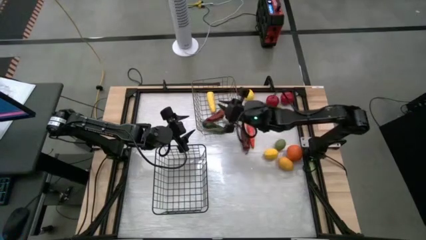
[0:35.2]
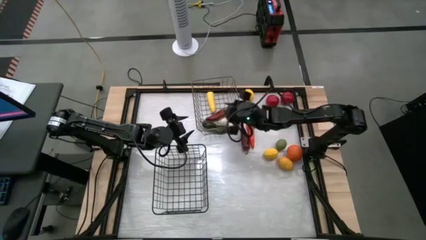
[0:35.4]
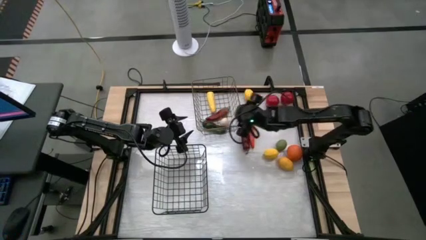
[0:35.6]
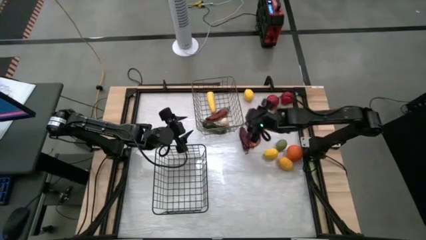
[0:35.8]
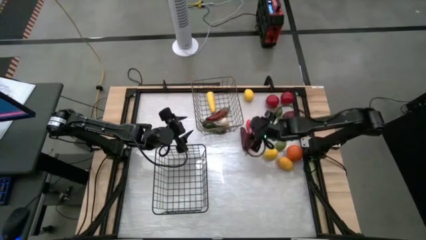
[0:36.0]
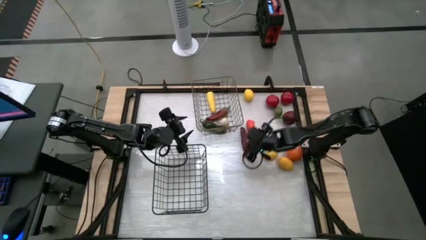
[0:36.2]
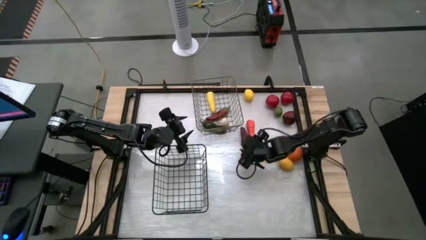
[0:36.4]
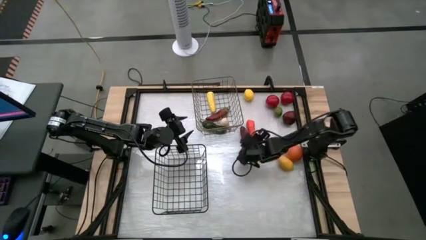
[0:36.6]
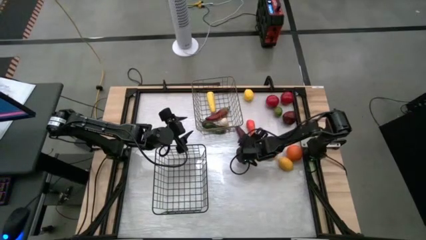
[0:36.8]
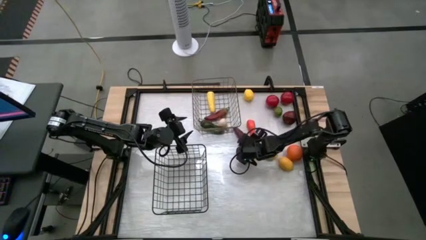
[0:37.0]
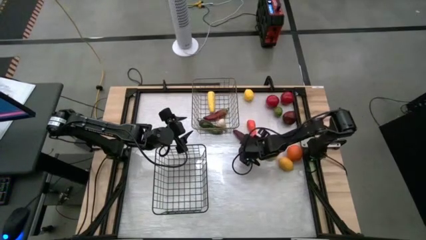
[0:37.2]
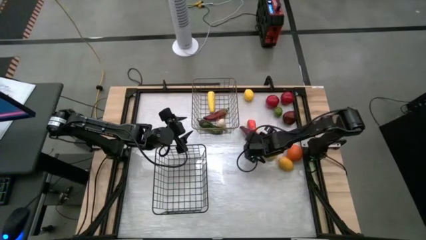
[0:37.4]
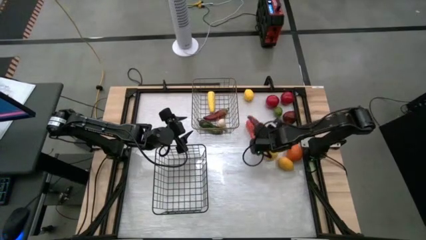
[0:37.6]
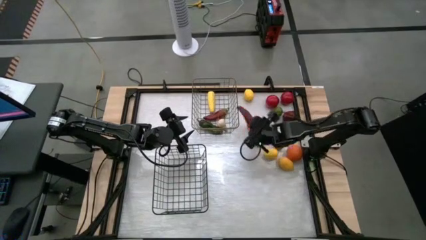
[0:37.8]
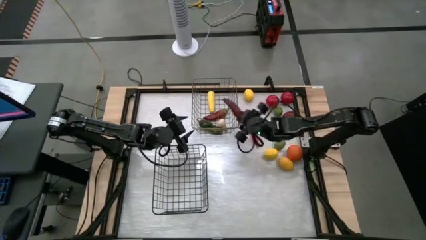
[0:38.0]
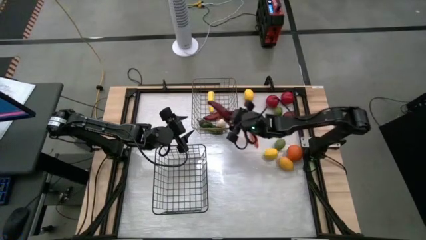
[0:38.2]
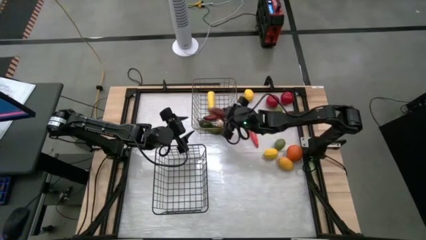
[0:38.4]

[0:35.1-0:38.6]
Task: Sort produce into baskets
Put the red chili pepper into the gold wire basket

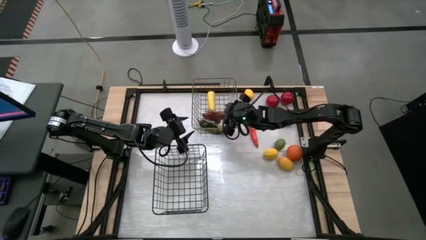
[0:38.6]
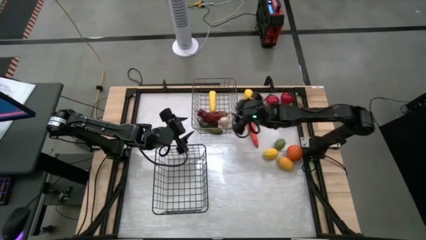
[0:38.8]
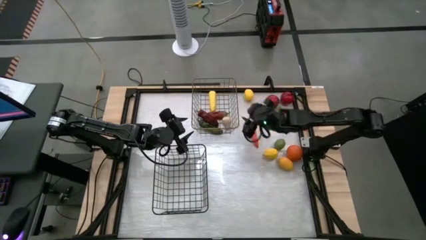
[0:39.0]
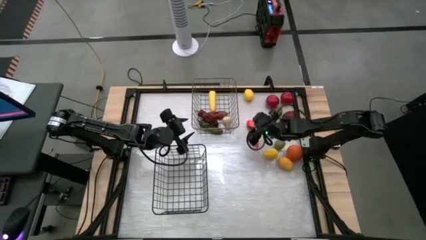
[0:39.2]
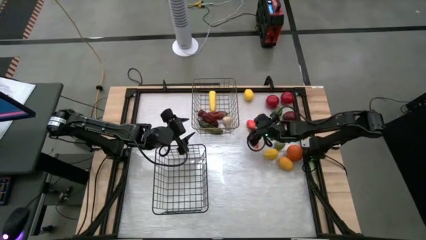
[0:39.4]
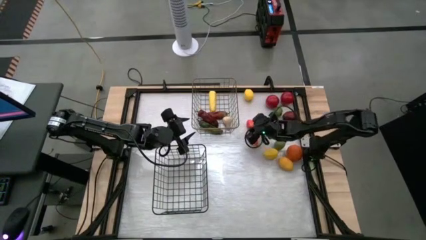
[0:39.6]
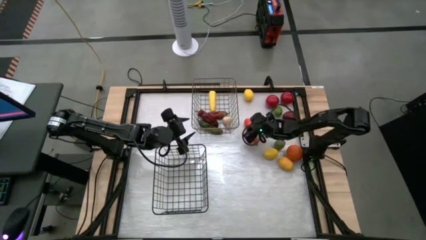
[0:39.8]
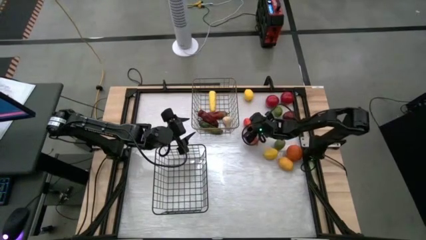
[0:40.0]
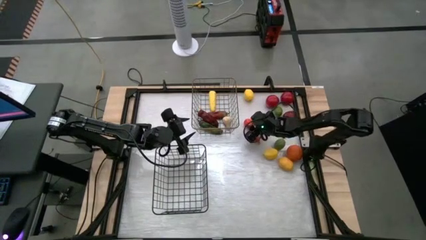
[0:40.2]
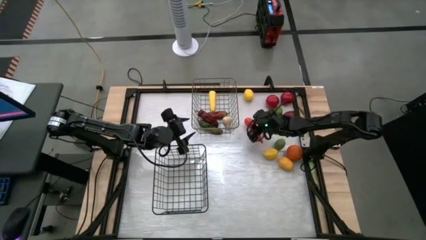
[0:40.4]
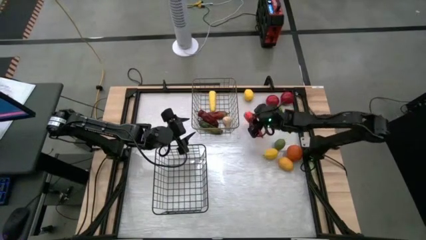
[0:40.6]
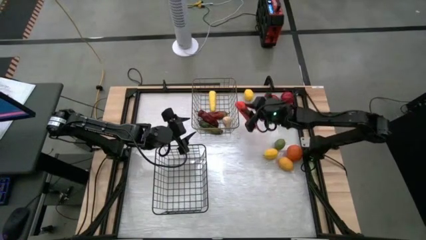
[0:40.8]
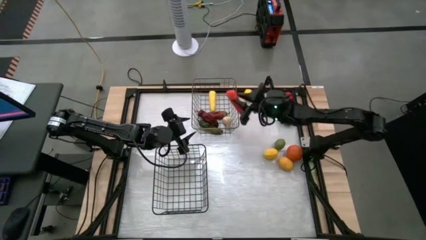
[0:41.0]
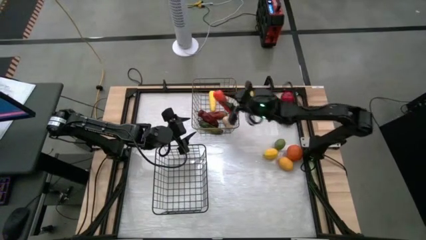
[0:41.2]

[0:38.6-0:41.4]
Put the carrot into the gold wire basket

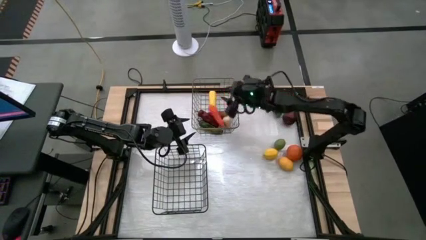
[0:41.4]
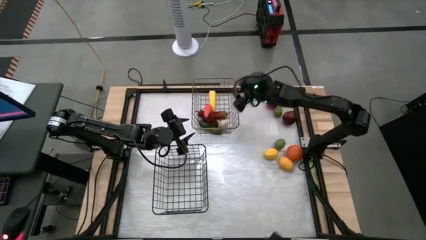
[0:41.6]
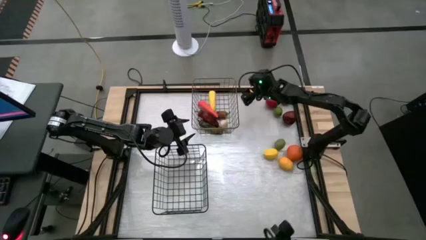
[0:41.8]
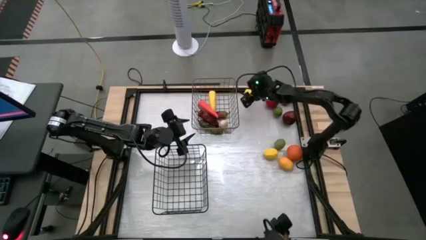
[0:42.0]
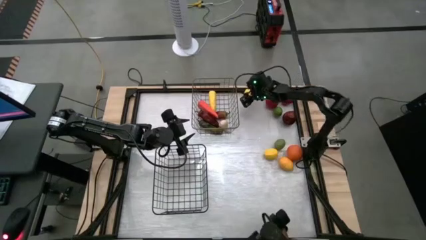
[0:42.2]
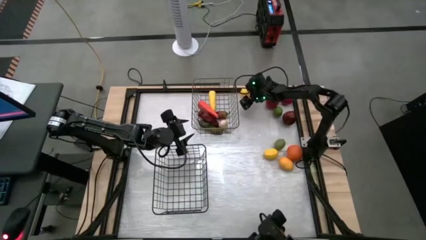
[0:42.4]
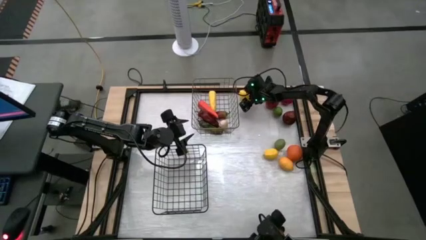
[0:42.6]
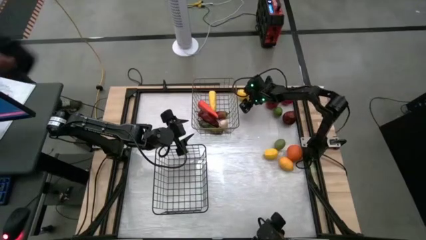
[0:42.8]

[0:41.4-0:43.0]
Put the top lemon into the black wire basket

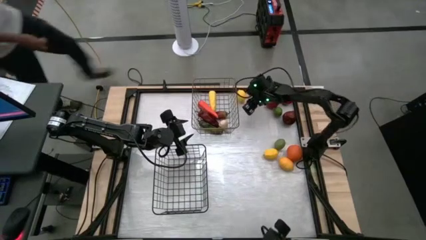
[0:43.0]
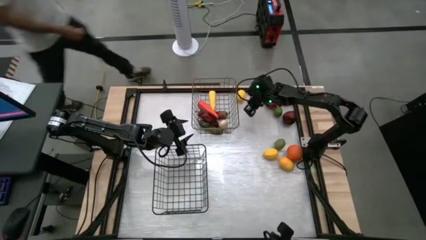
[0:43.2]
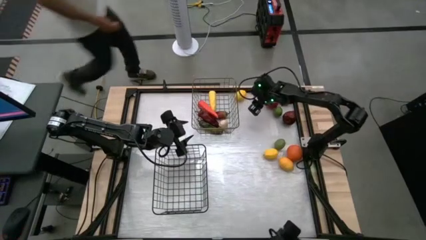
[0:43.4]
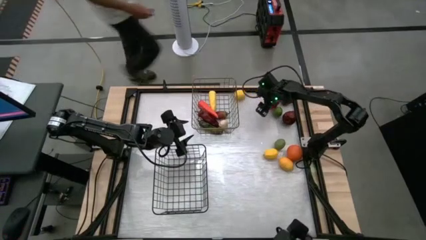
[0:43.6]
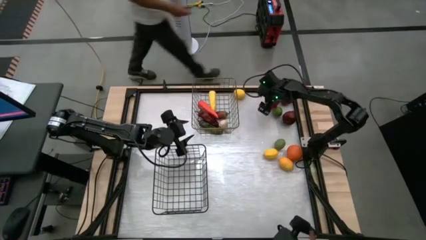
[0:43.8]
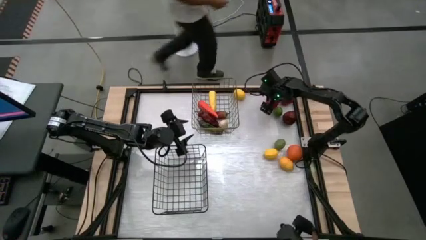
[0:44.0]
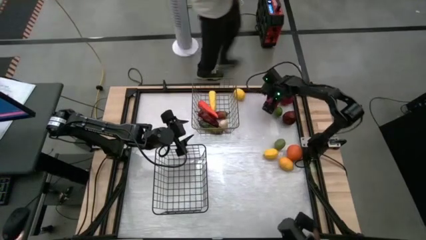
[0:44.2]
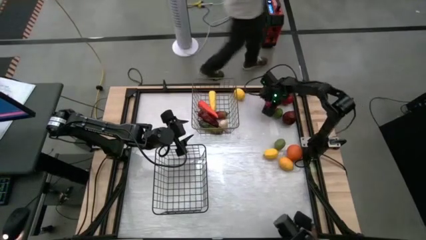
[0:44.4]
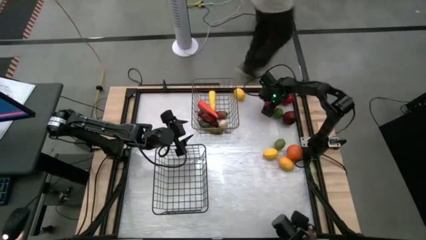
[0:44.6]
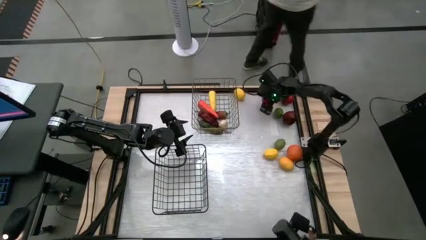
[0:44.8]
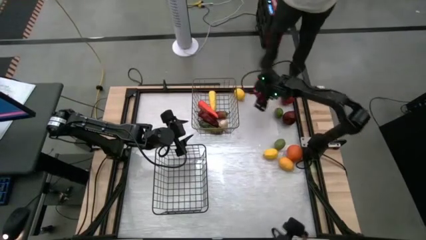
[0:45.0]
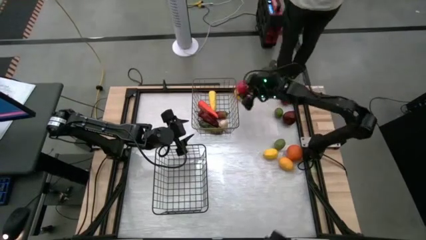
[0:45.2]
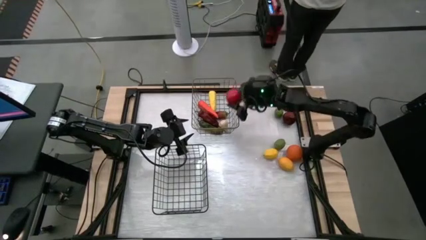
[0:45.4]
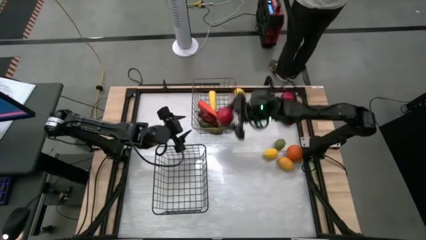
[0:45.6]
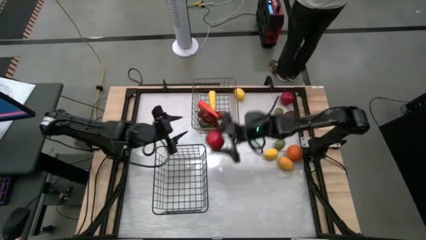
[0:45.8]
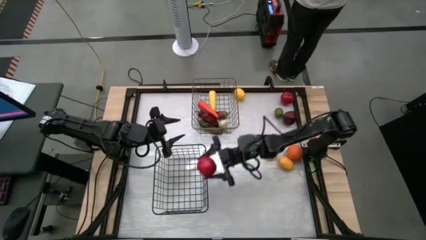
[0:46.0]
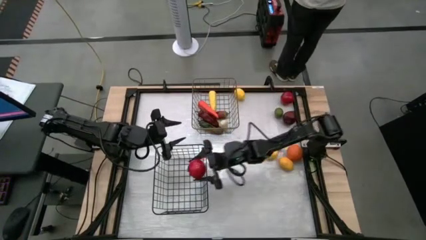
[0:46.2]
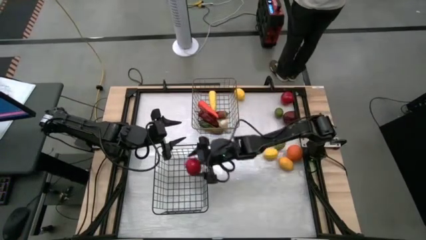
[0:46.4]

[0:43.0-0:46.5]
Put the left tomato into the black wire basket

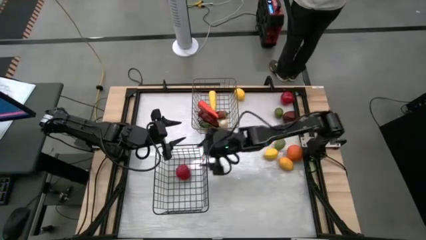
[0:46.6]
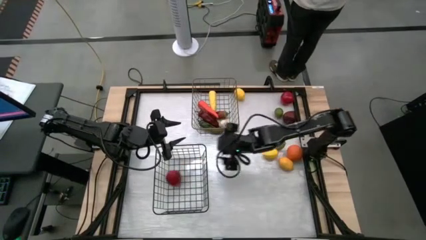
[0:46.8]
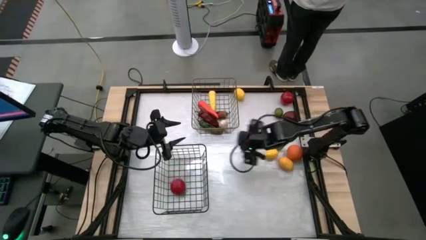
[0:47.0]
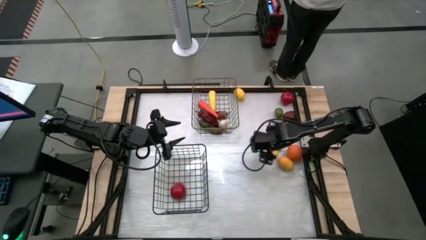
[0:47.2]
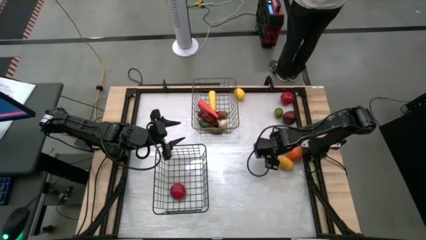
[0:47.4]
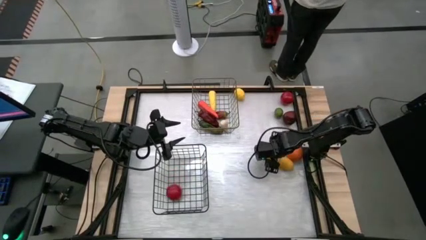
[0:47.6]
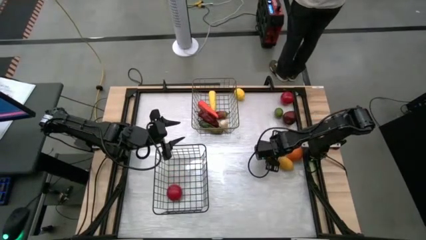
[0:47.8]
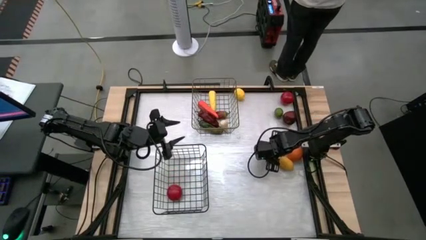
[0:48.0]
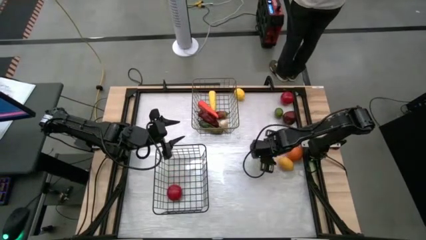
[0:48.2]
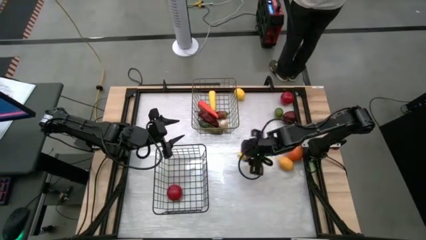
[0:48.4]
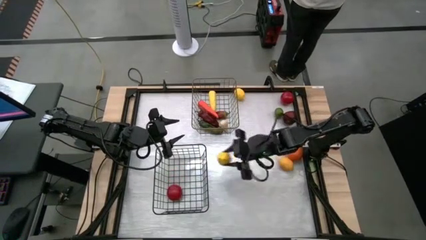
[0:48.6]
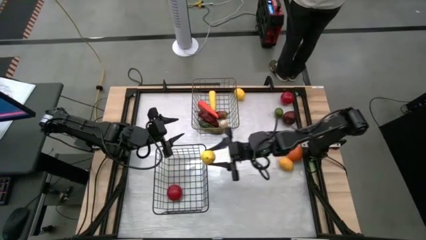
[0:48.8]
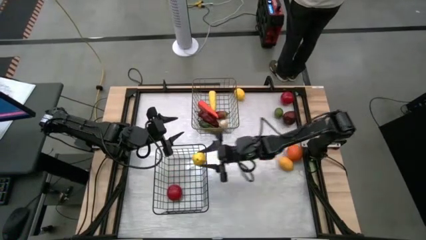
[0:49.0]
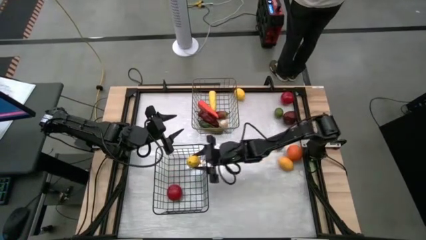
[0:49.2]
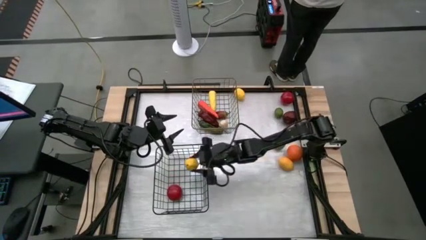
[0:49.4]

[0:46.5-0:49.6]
Put the bottom lemon into the black wire basket

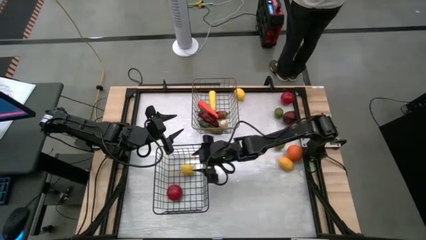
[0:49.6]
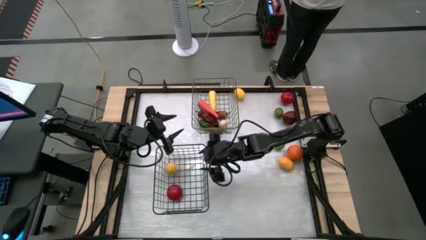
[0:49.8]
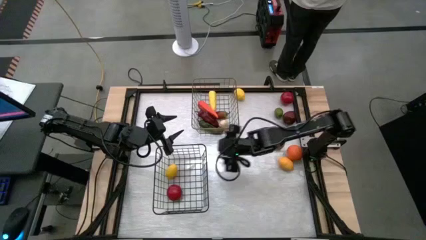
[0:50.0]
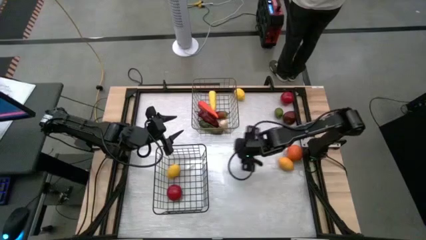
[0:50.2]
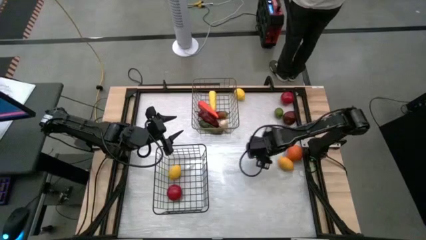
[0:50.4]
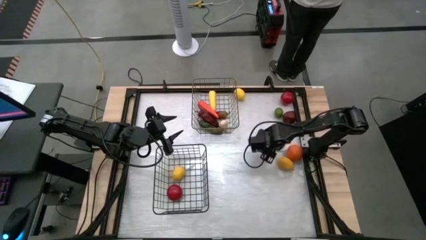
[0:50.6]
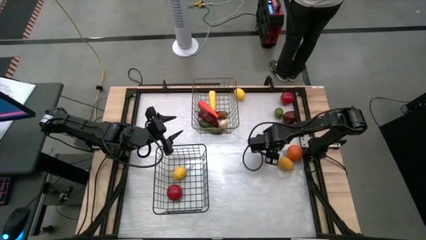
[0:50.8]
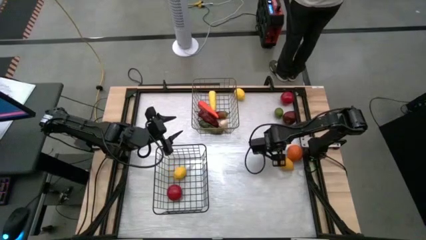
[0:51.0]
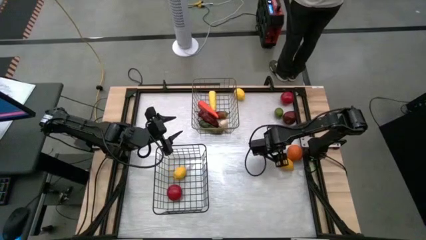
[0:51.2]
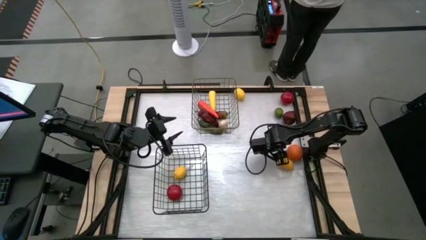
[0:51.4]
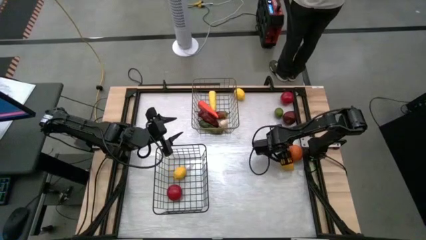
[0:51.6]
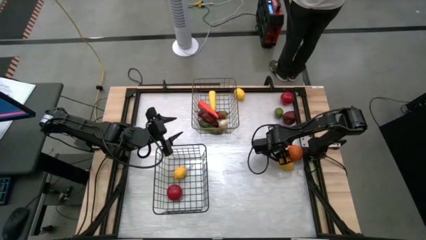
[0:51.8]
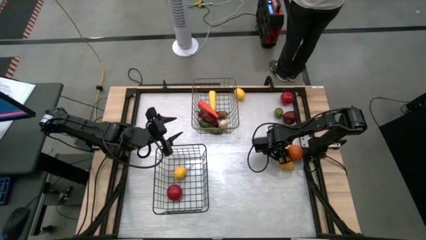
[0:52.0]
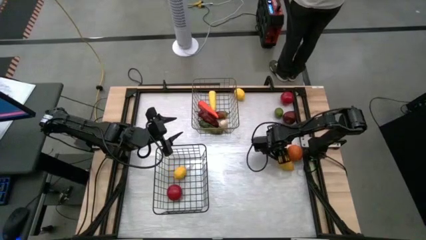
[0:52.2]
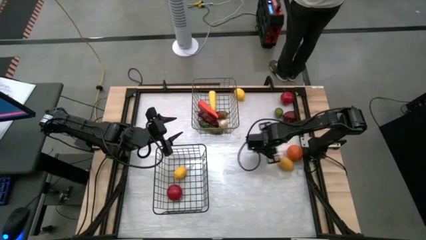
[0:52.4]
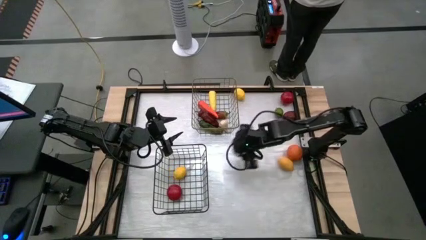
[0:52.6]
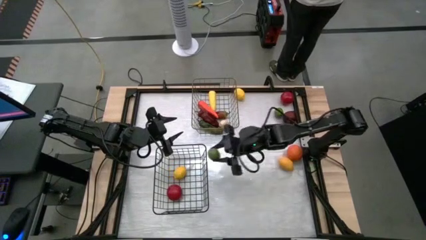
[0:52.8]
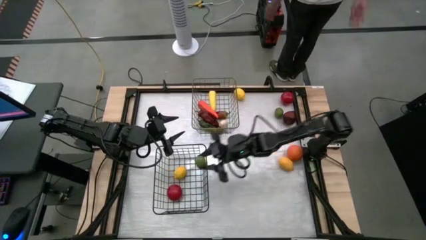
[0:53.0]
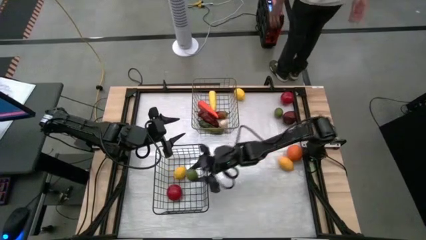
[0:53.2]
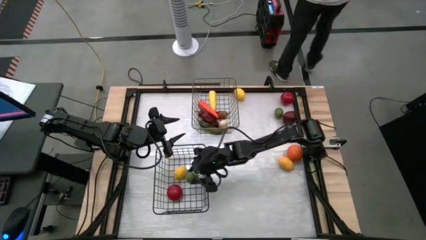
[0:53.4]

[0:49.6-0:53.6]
Put the bottom lime into the black wire basket
